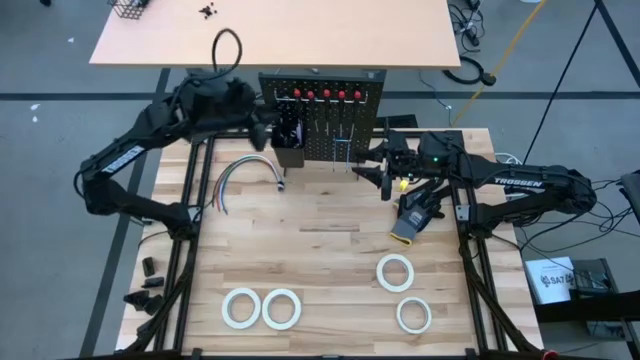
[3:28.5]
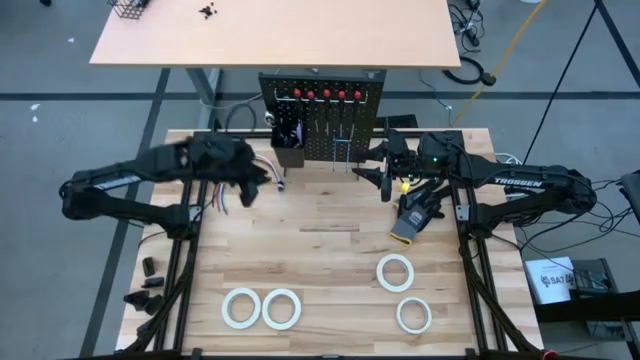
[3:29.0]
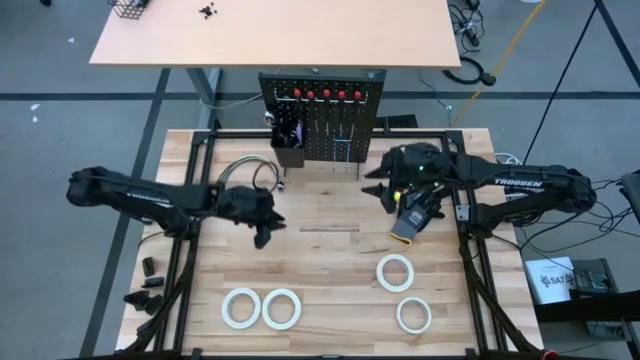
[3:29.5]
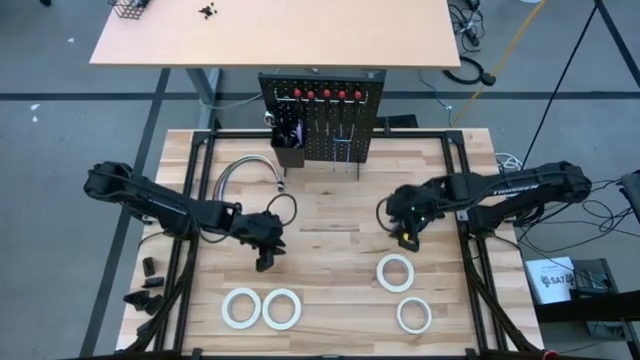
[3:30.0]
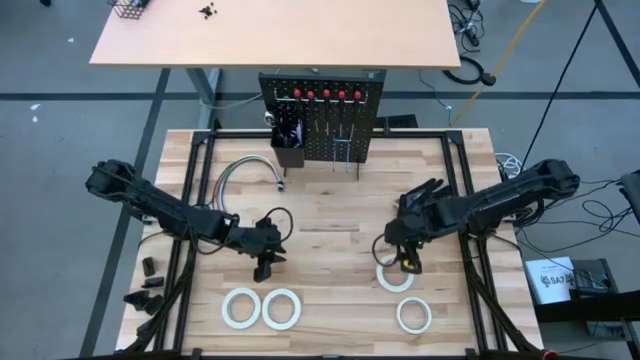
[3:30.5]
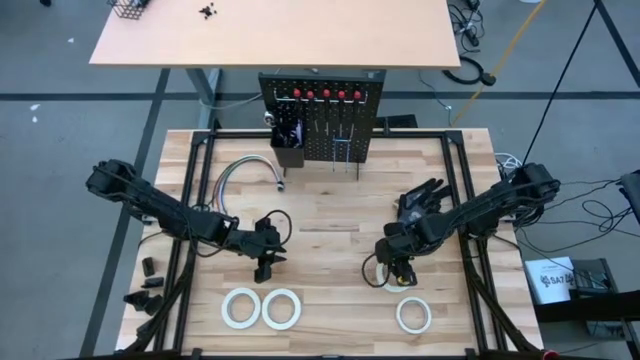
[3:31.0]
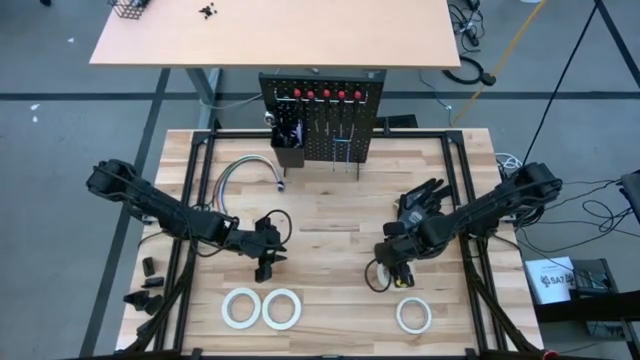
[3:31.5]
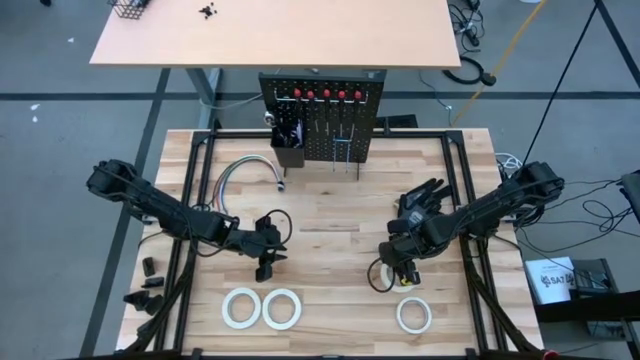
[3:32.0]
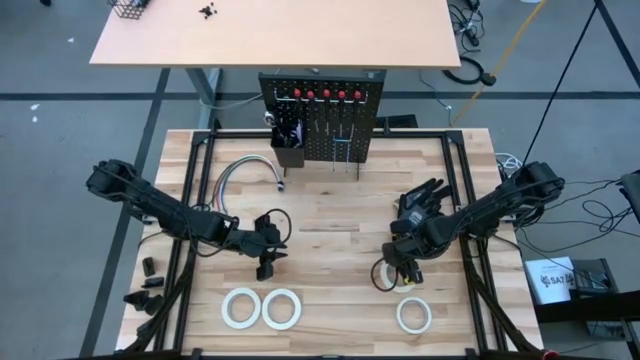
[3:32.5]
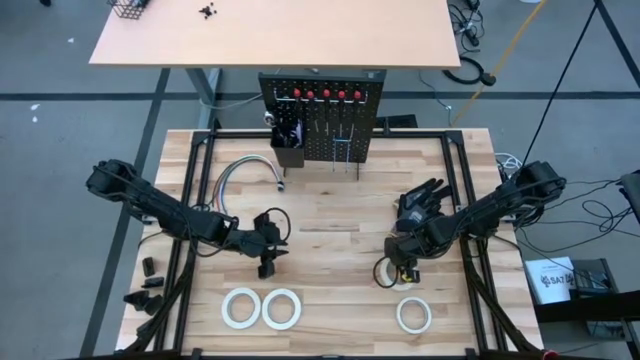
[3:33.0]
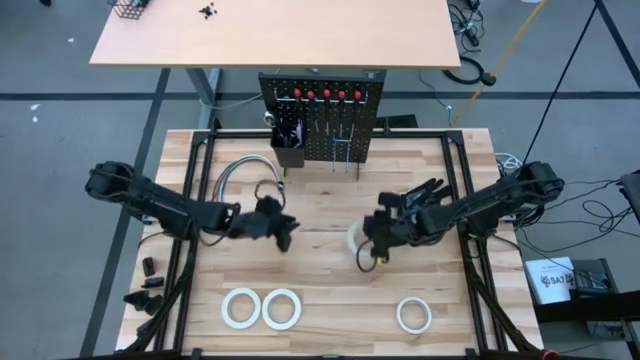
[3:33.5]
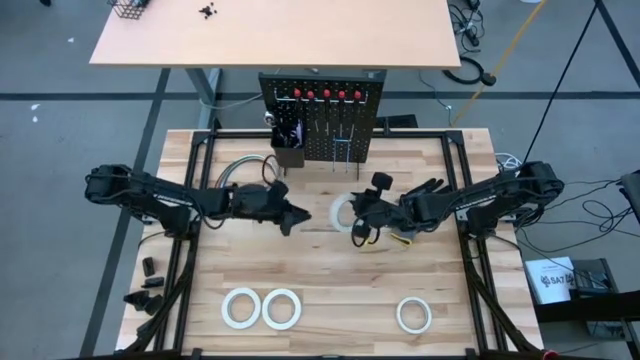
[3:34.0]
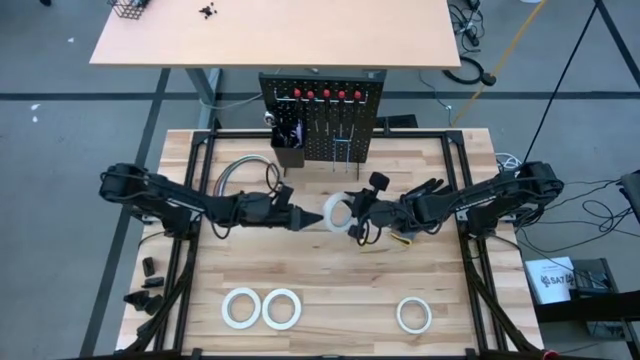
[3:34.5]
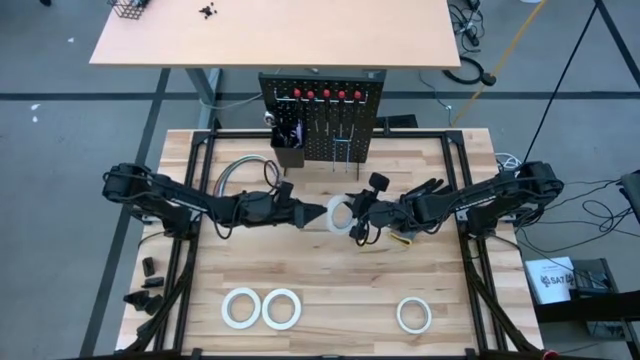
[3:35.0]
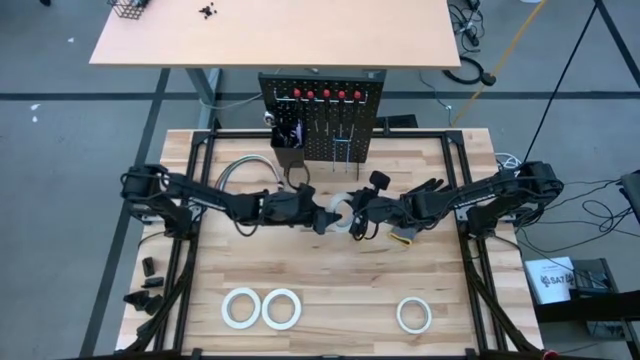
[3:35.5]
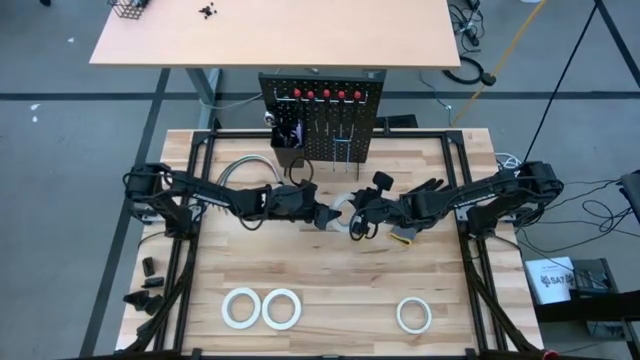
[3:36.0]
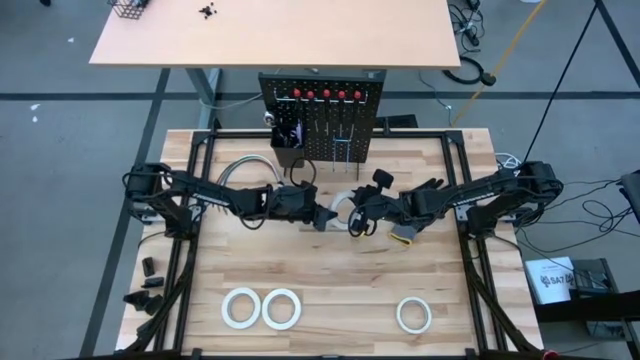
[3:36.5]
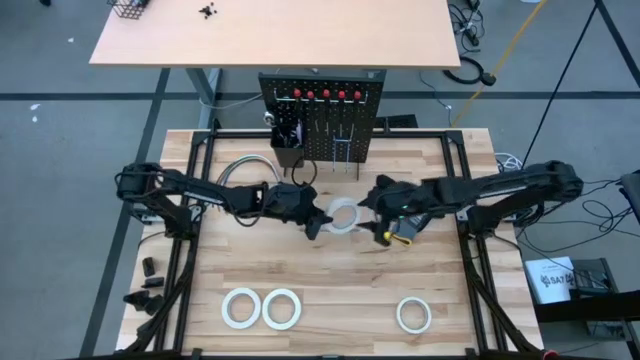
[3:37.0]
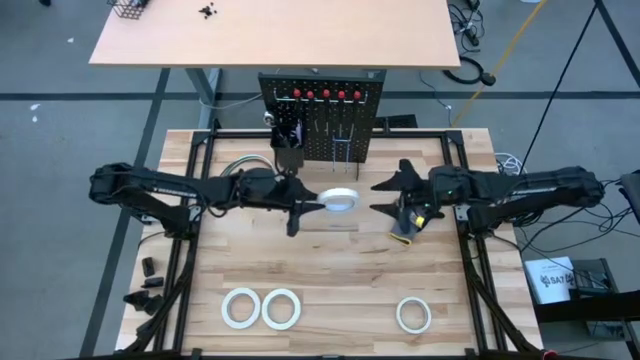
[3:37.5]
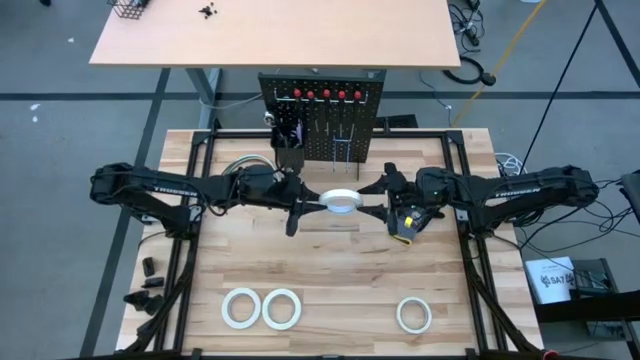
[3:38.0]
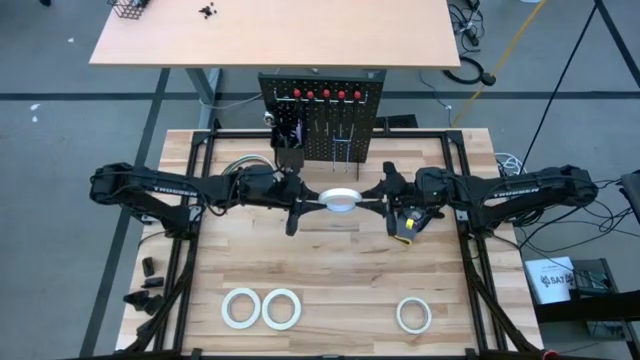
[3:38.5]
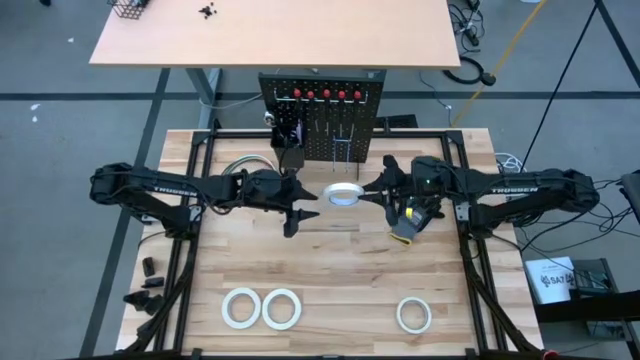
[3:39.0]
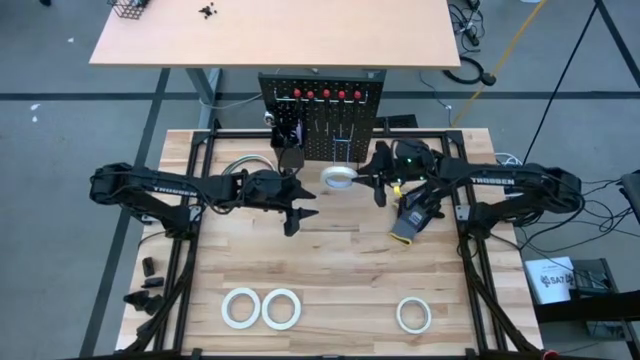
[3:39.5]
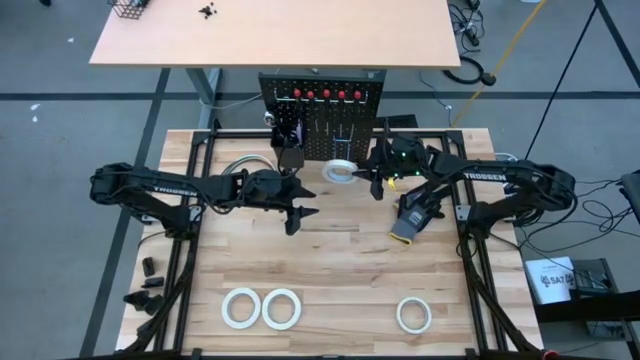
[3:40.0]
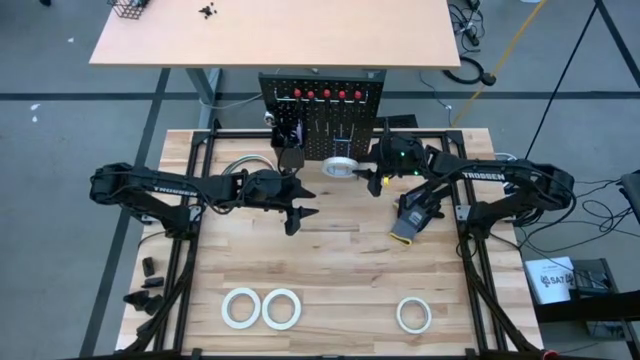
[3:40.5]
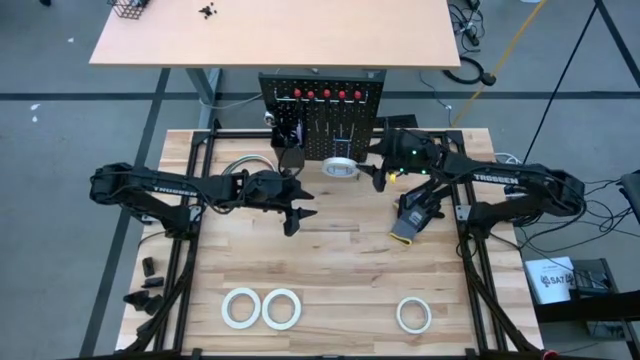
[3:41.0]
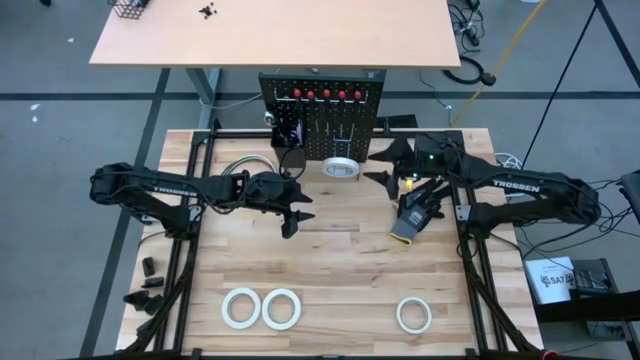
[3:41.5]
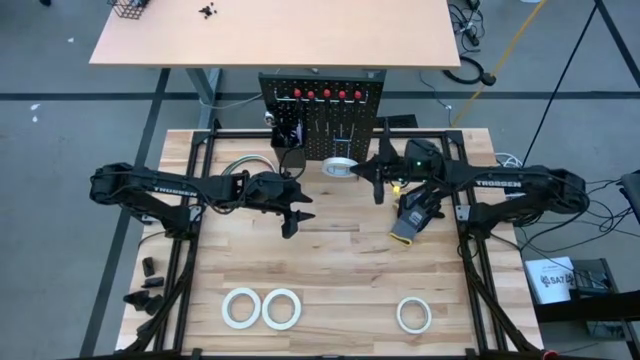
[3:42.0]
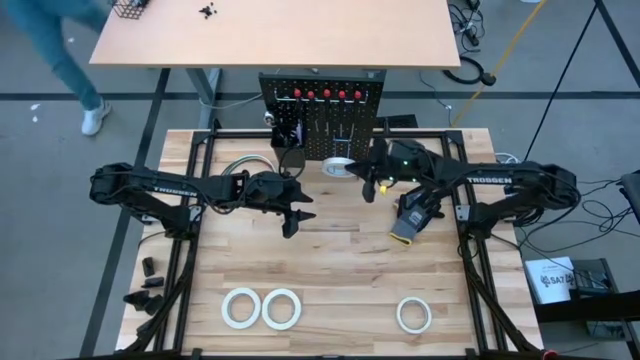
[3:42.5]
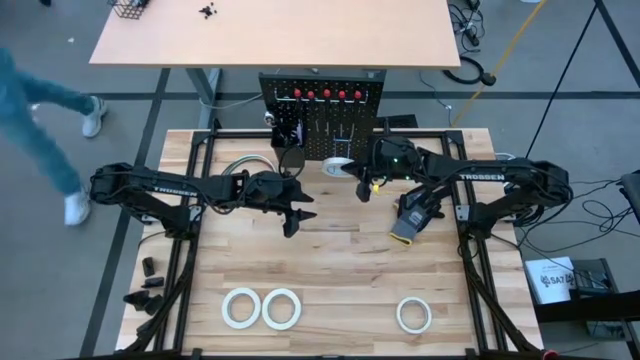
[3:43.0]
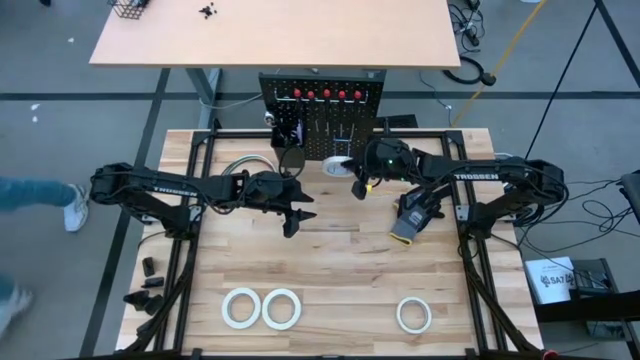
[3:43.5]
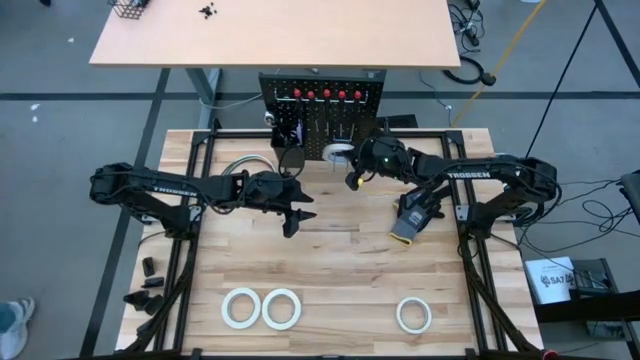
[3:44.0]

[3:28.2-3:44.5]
Task: Hang tools onto peg board
Hang the white tape on the peg board

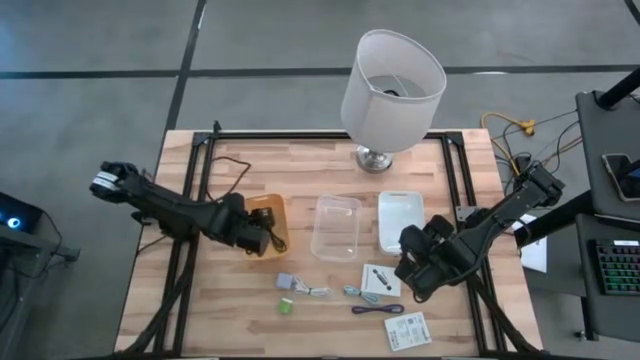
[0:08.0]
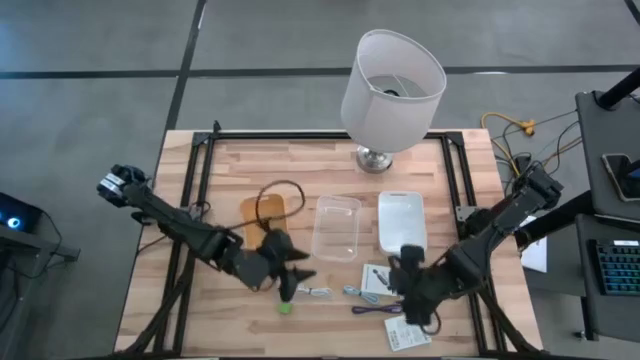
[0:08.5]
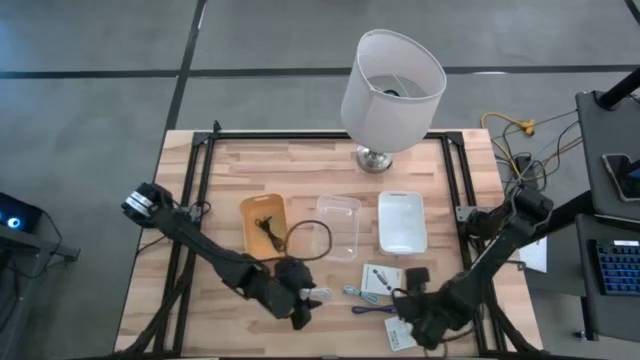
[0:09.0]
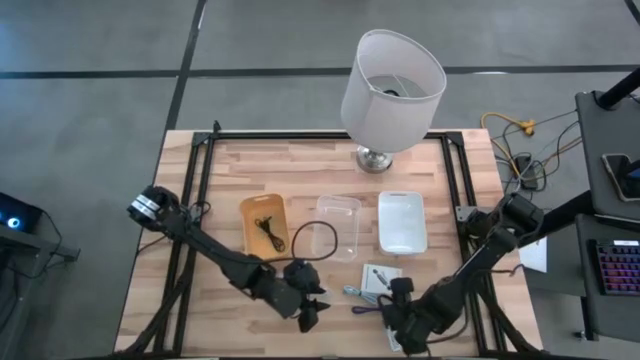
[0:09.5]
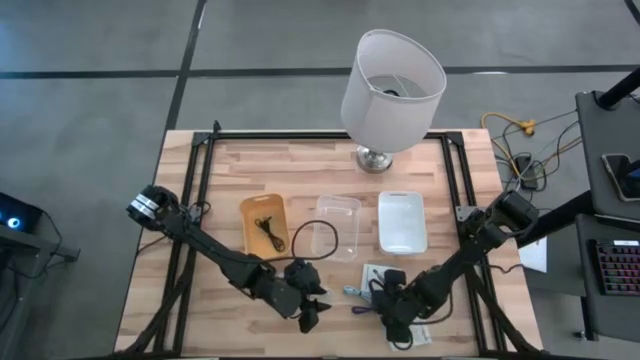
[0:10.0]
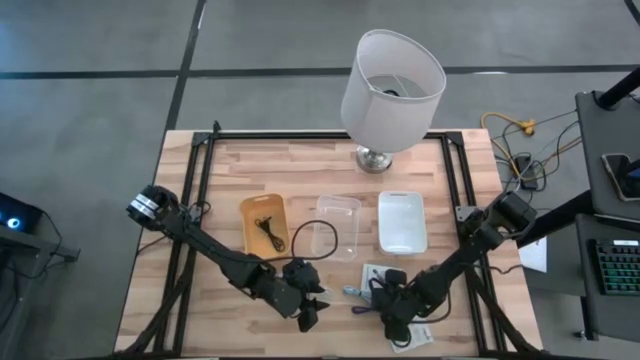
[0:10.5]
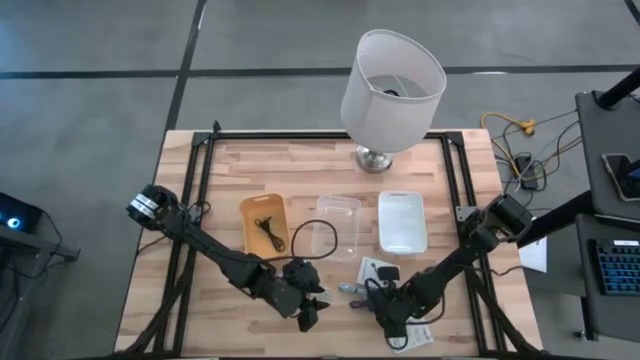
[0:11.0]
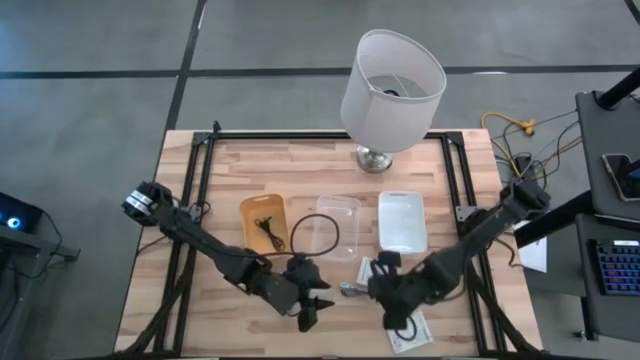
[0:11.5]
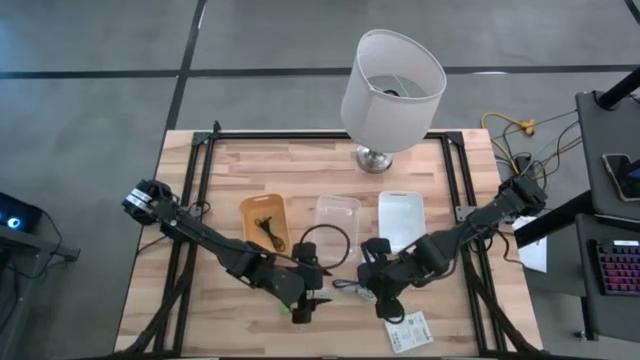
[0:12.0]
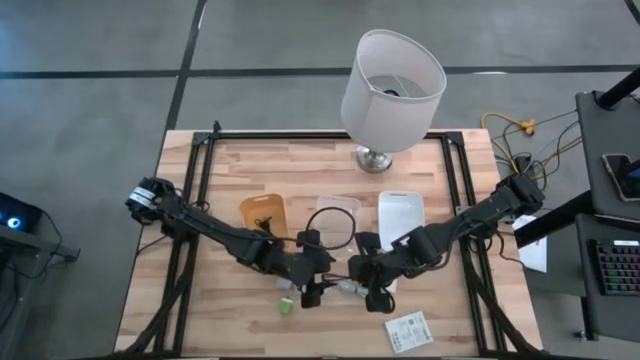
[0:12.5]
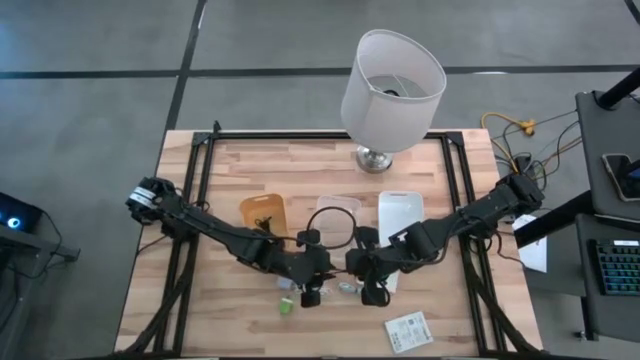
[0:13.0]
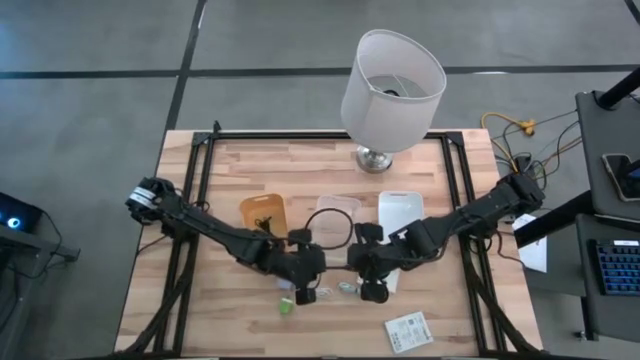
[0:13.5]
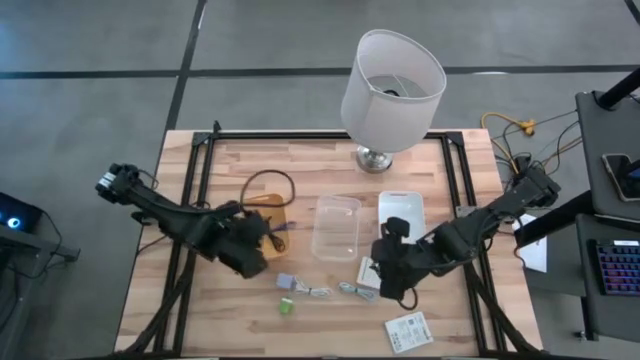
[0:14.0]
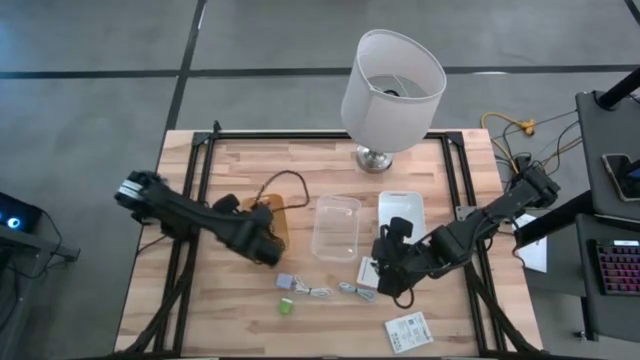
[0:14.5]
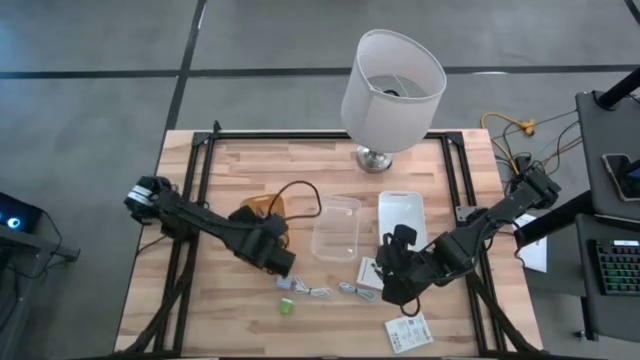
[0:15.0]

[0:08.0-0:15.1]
Task: Pick and place items into bin
Put the purple charger cable into the yellow bin
